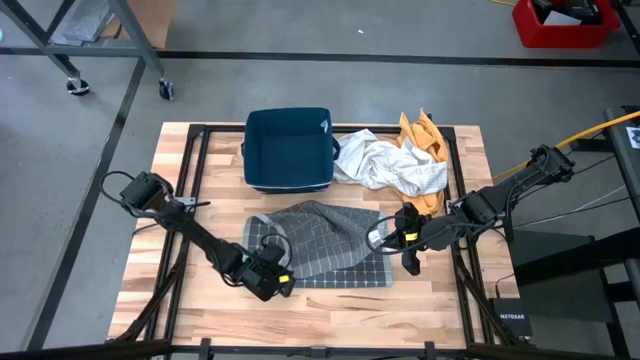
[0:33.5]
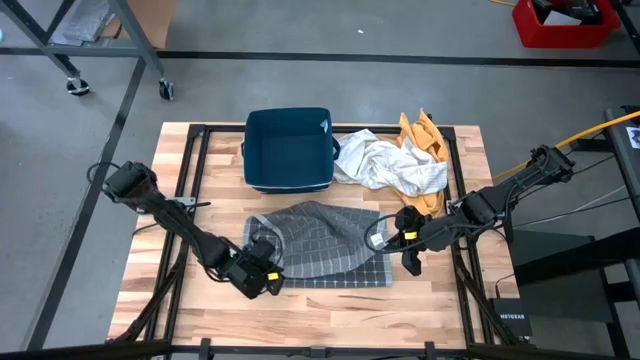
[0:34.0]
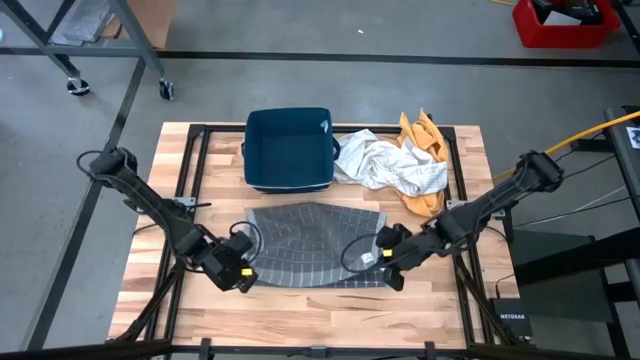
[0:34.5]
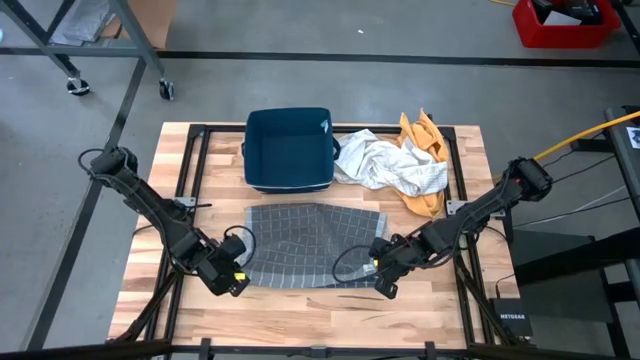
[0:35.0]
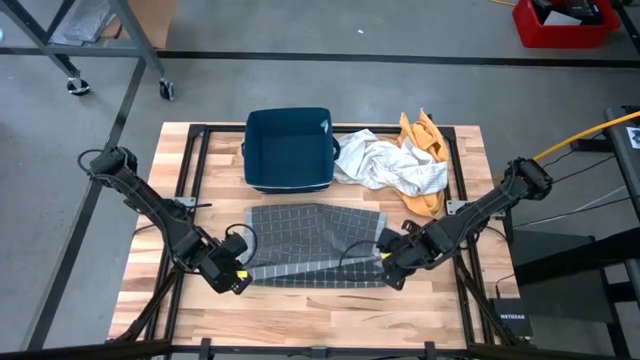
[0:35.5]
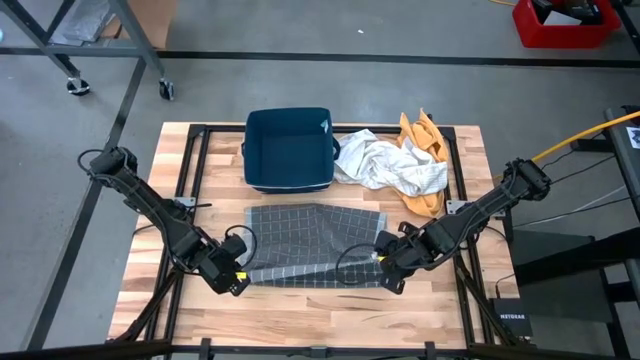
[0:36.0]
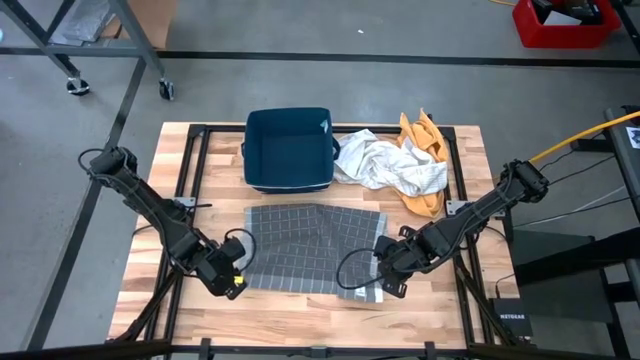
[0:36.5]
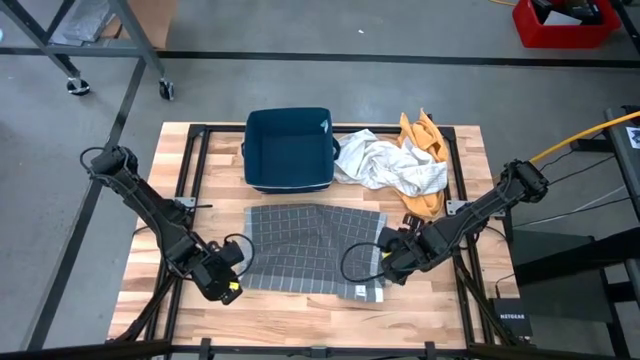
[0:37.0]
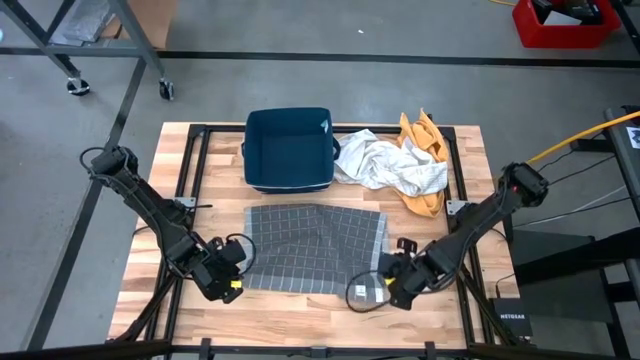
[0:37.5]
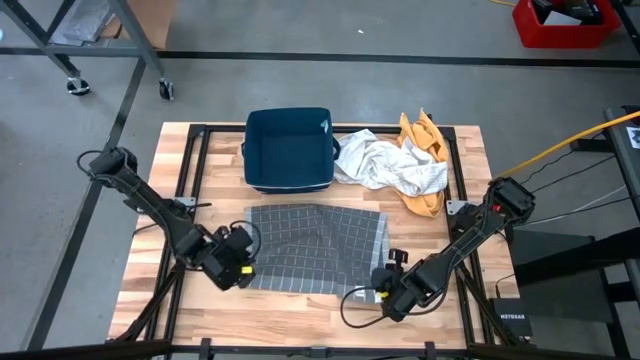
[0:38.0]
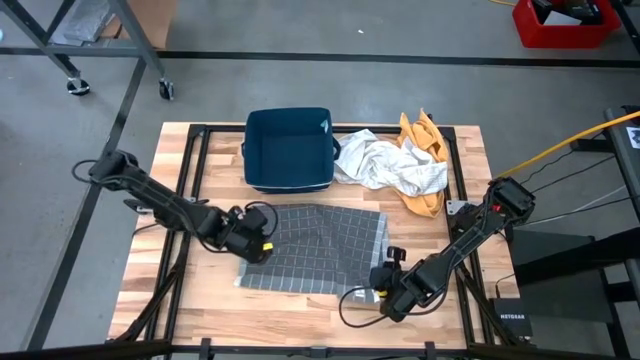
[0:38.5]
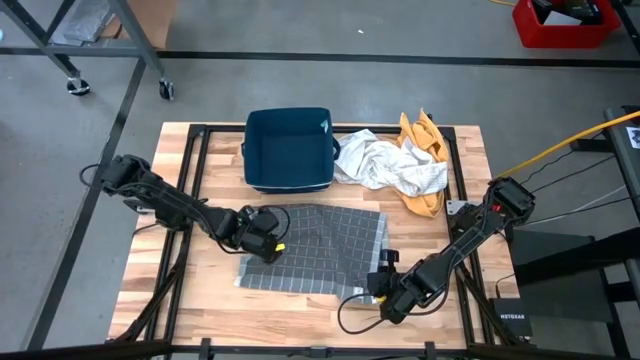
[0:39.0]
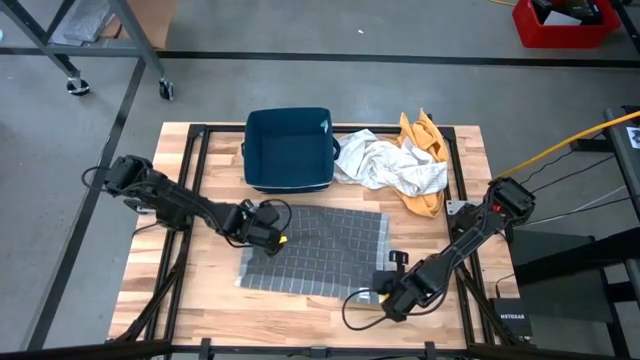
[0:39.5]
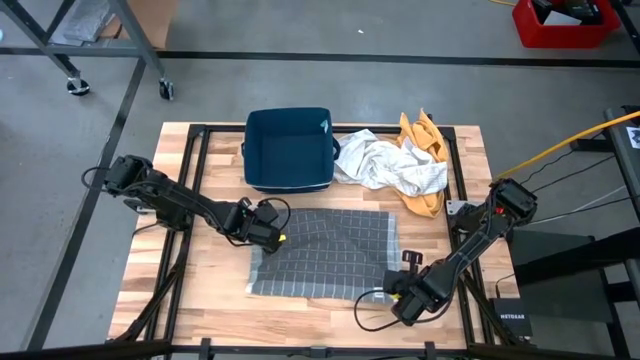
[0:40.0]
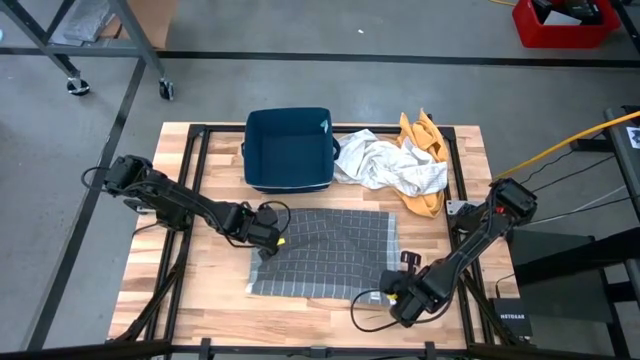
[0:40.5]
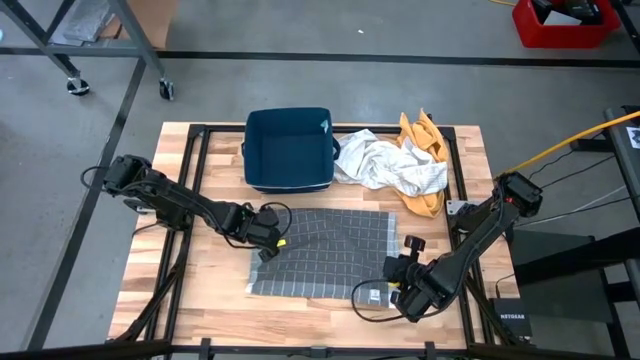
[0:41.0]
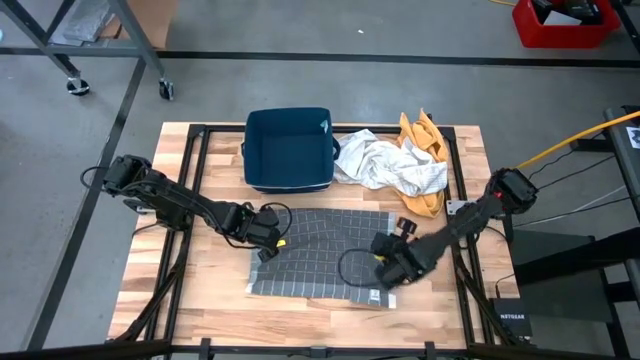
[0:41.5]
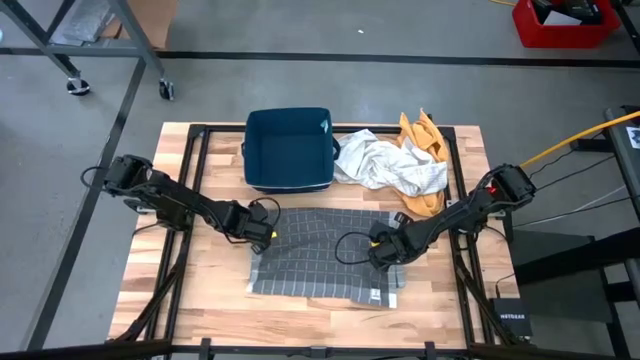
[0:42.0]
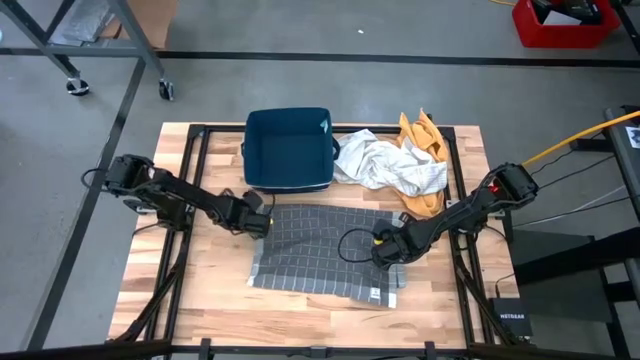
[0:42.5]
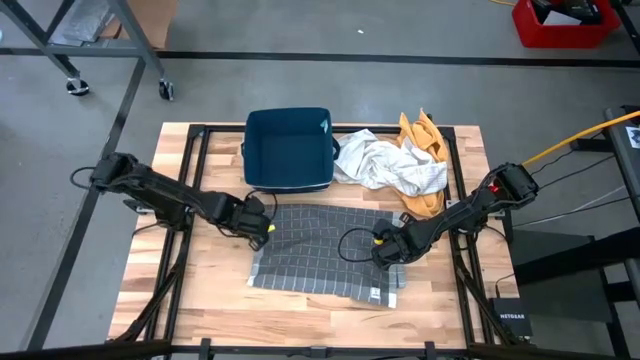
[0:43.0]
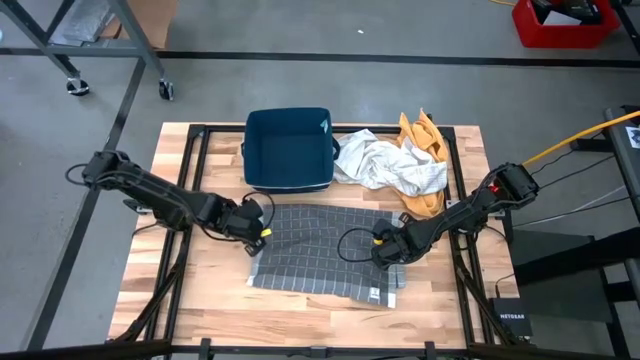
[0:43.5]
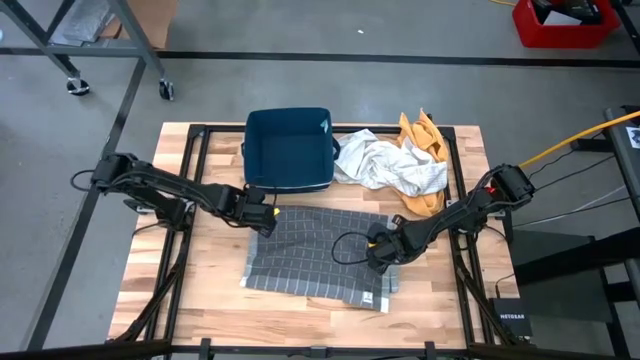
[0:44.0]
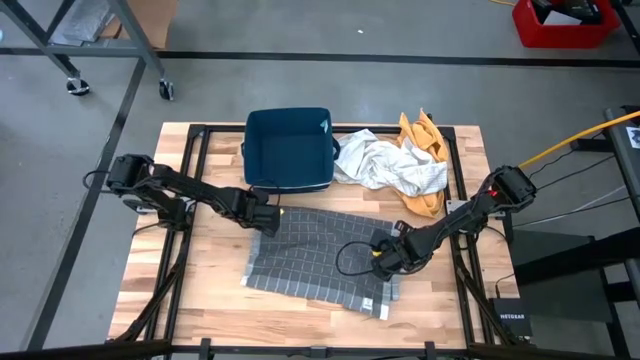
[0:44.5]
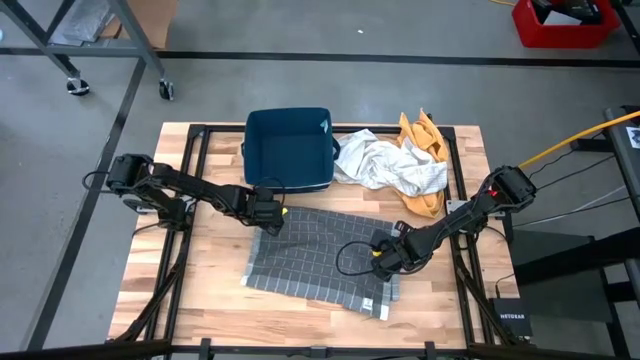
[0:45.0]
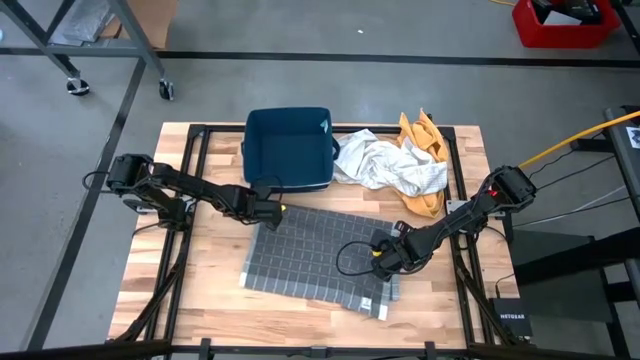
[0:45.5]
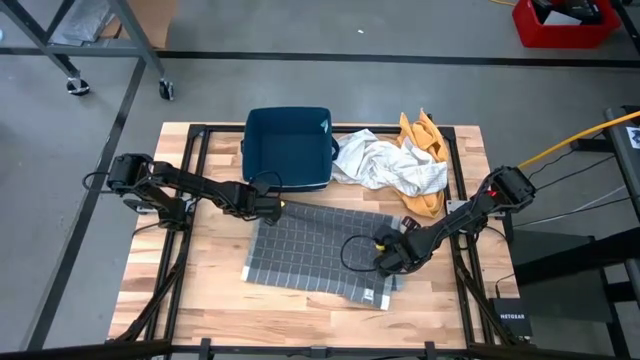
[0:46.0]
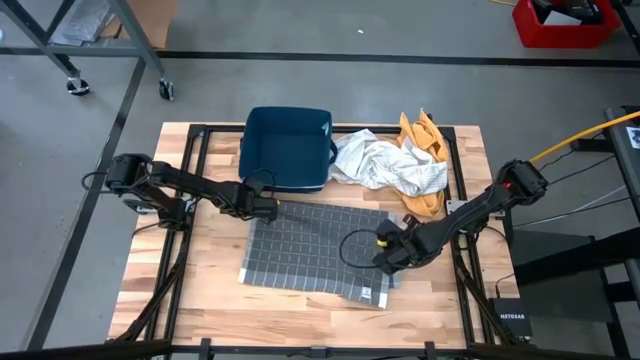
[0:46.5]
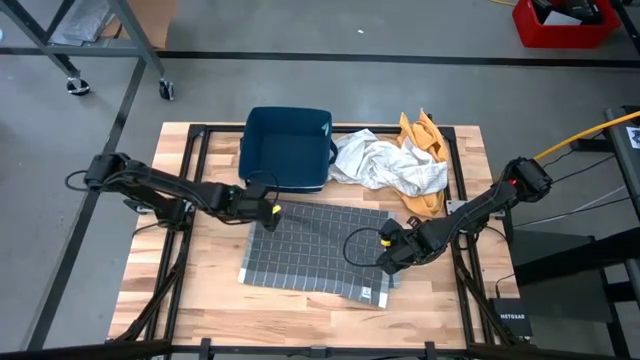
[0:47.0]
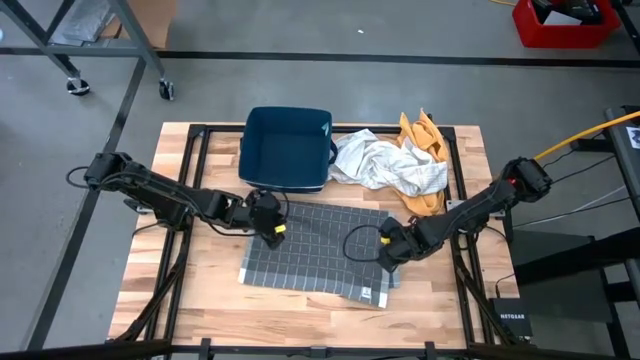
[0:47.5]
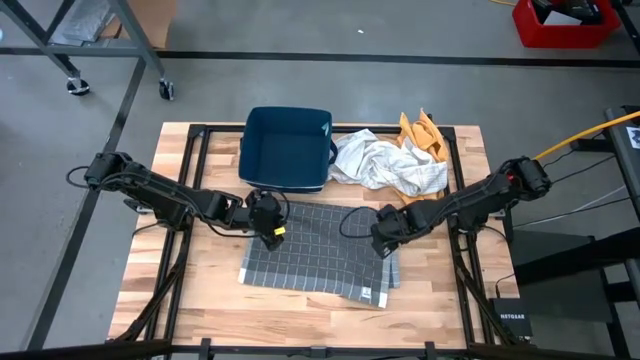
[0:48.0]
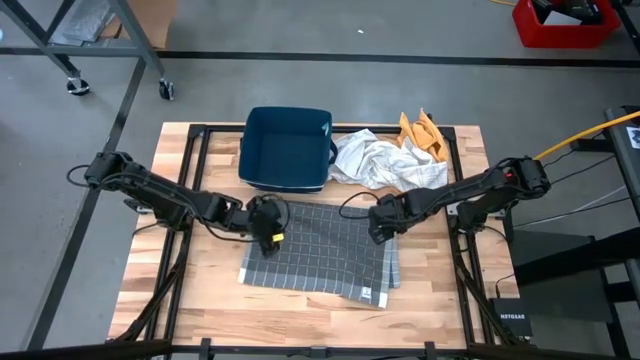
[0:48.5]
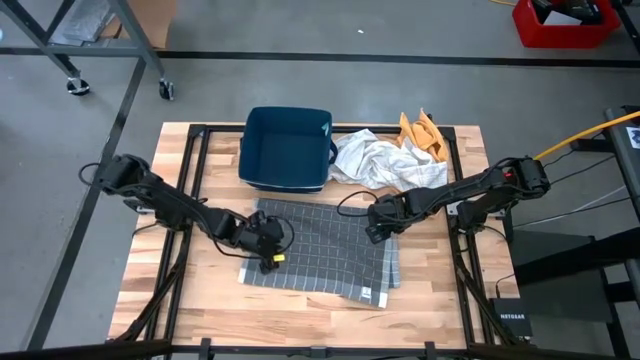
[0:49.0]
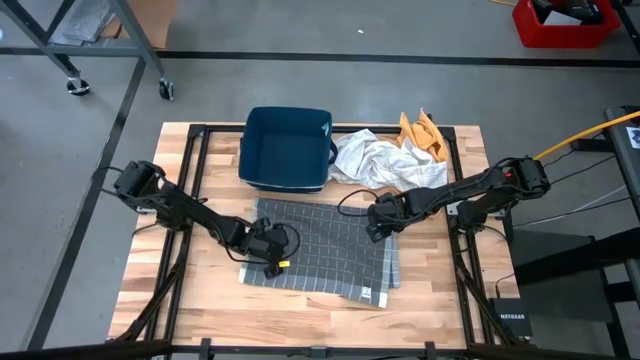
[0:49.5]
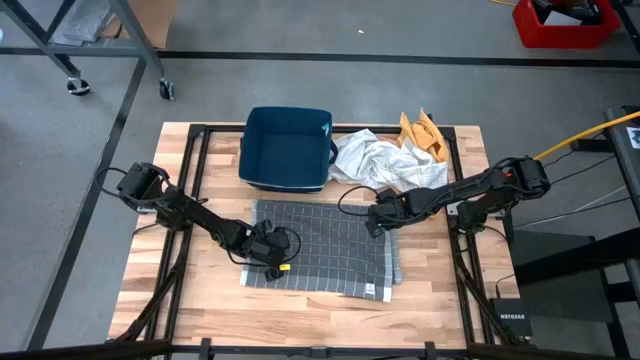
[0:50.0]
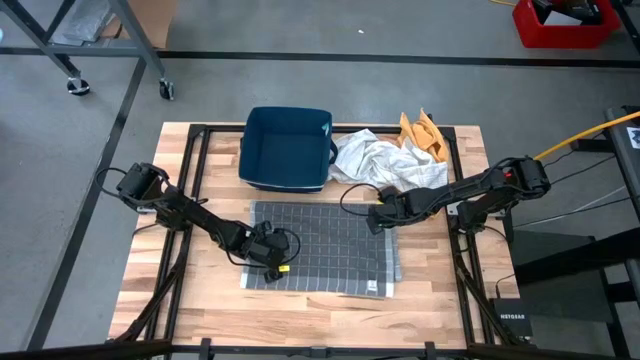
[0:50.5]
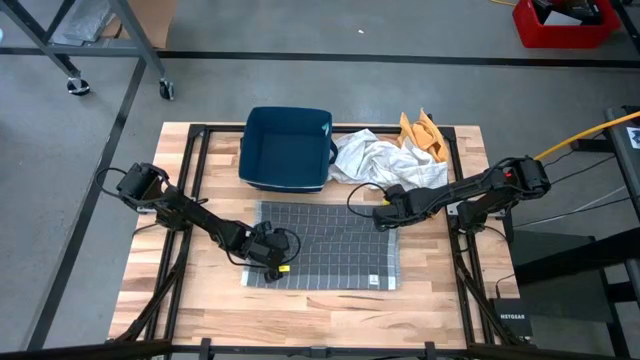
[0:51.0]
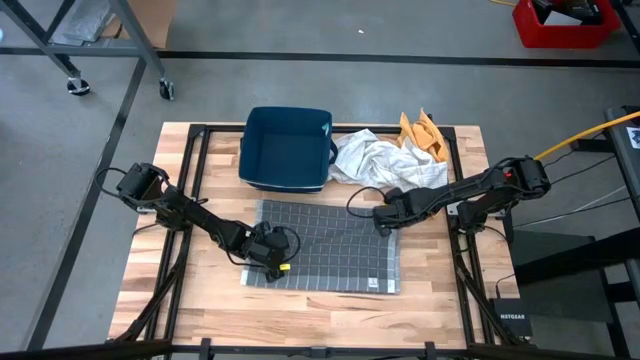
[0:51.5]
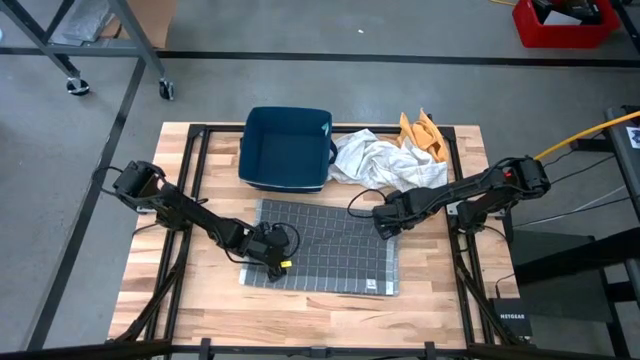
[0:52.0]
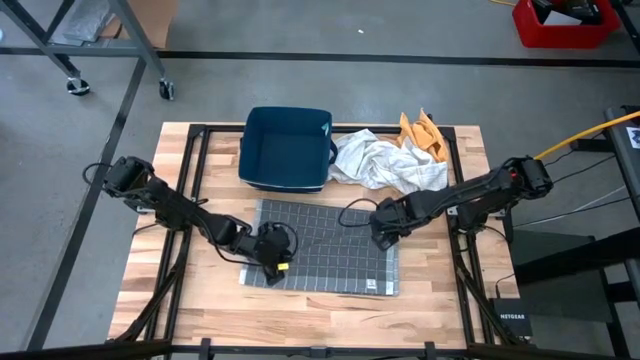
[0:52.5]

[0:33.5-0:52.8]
Task: Fold towel
Fold the gray patterned towel
